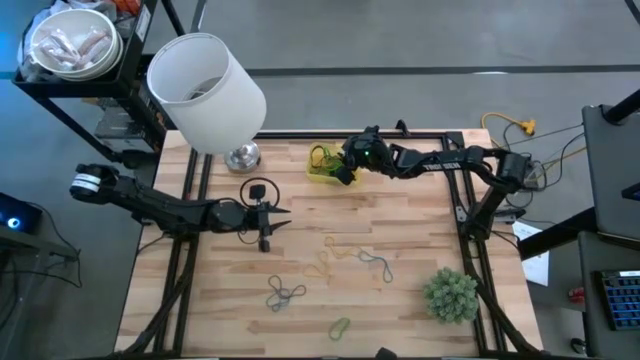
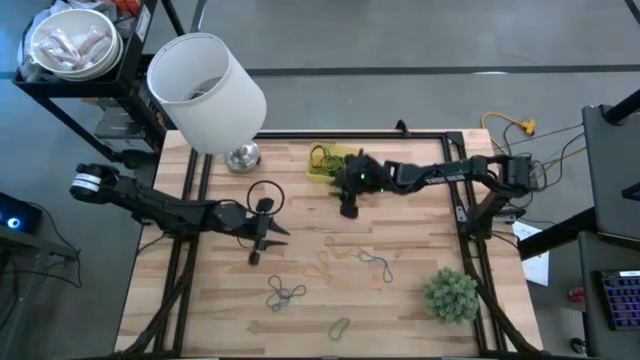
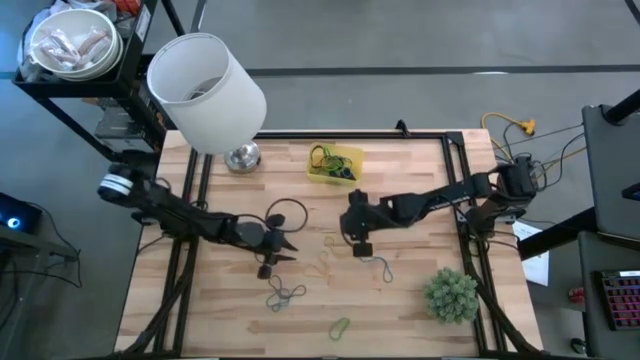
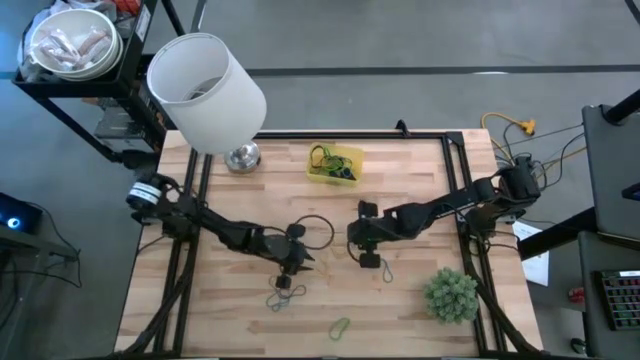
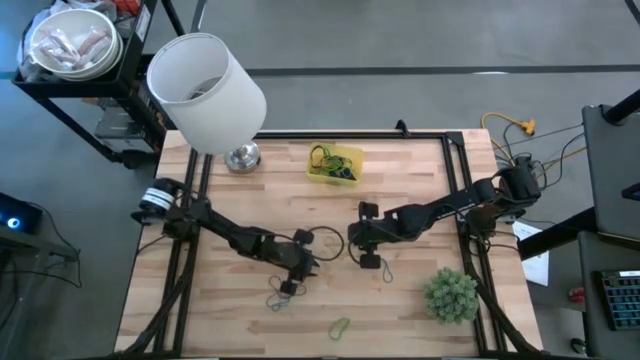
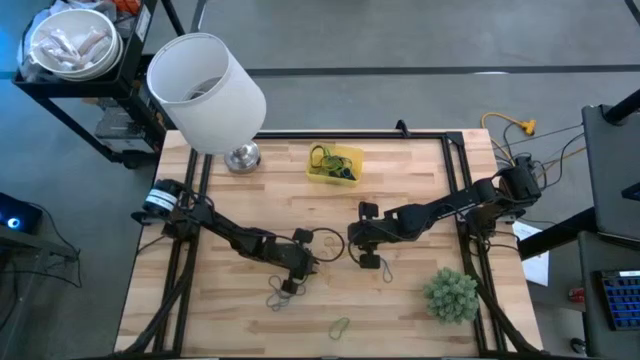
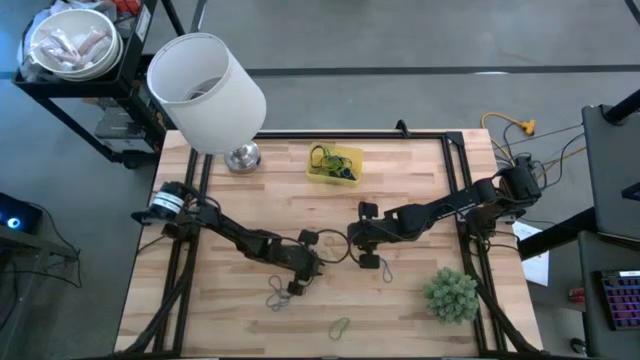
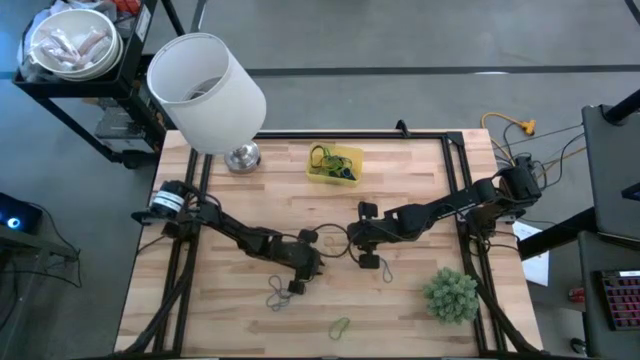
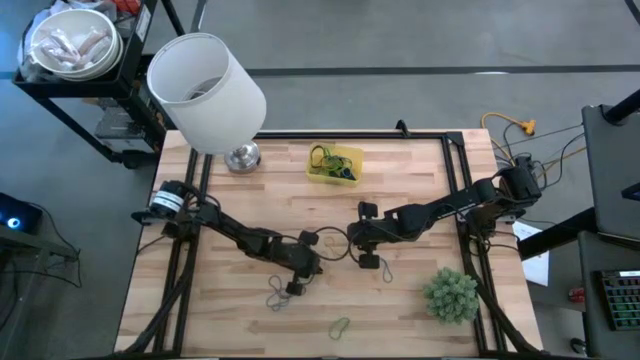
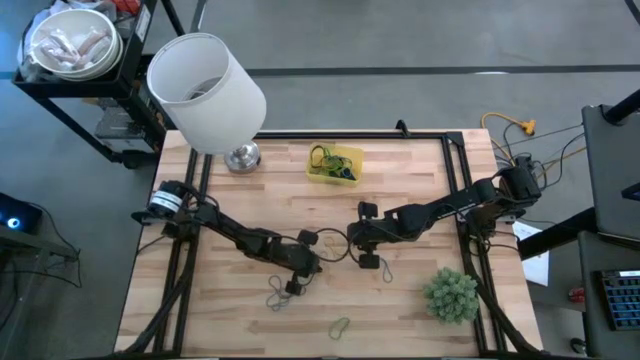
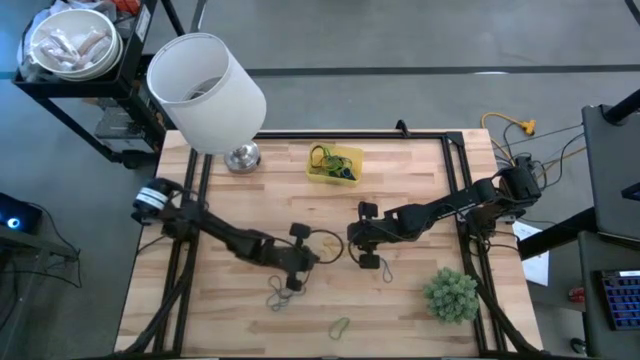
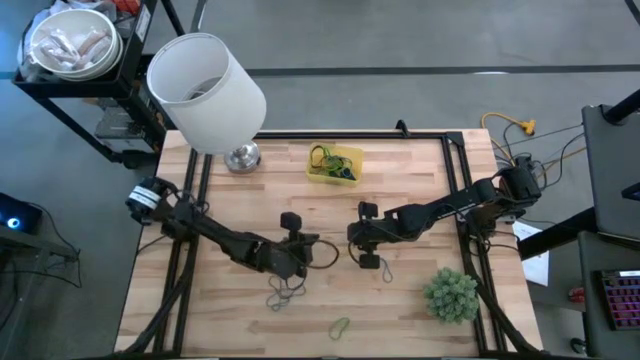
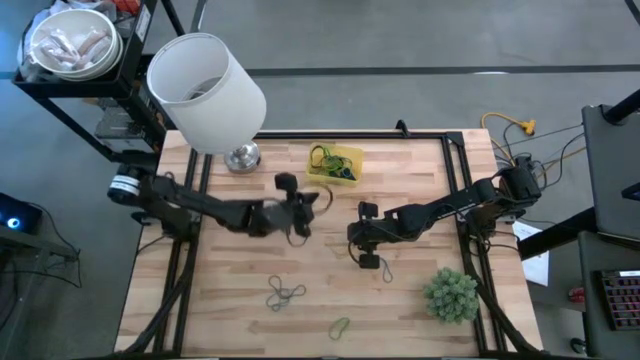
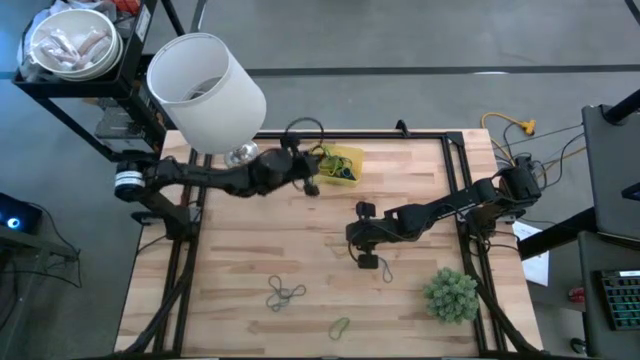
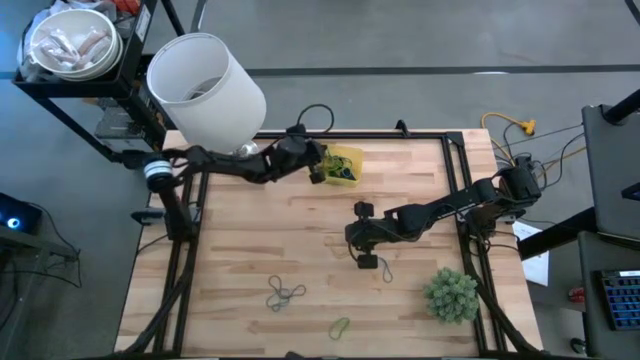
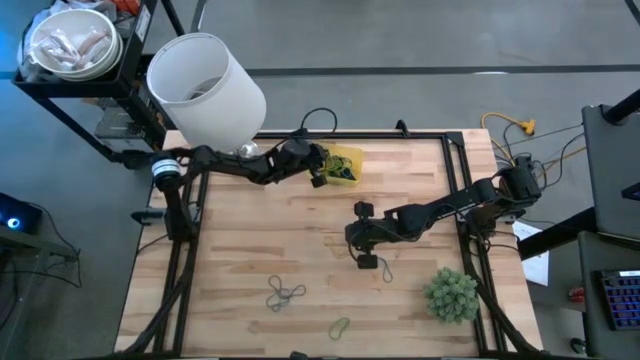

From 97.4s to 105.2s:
Task: Pick and place rubber bands into bin
Put the yellow rubber band into the yellow bin

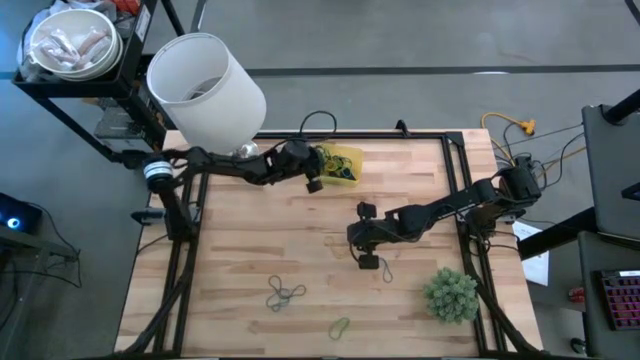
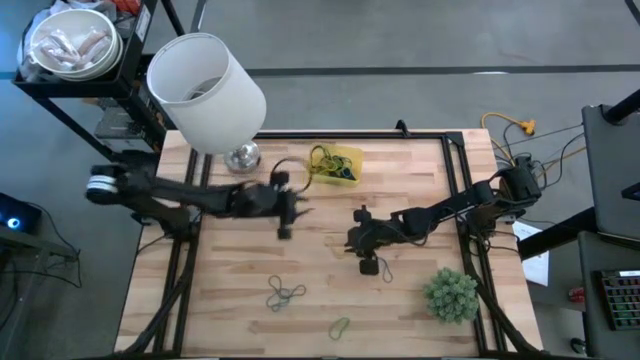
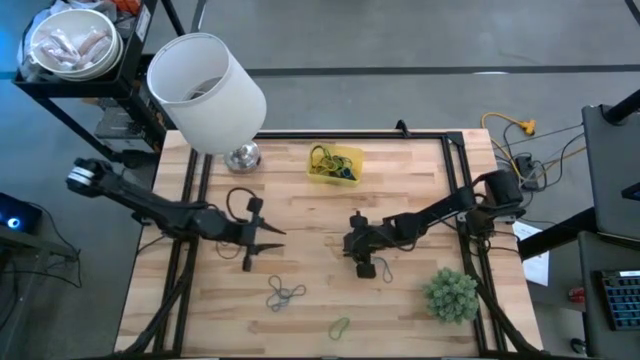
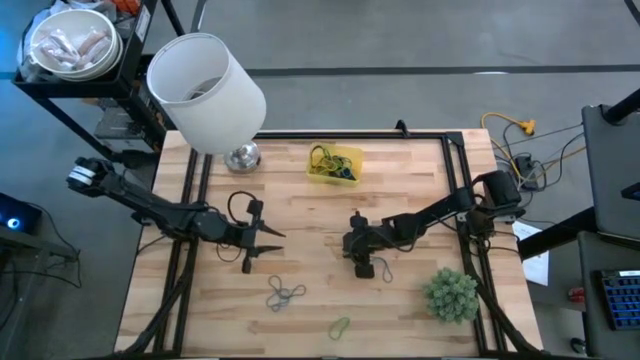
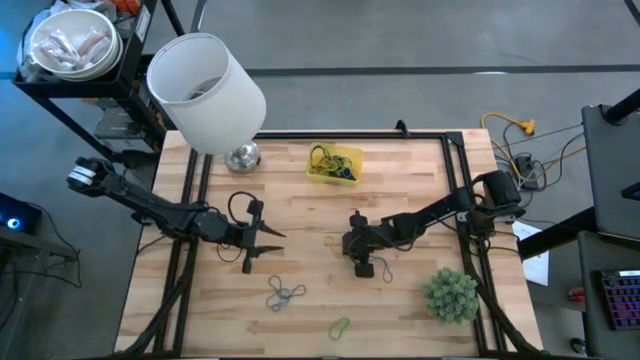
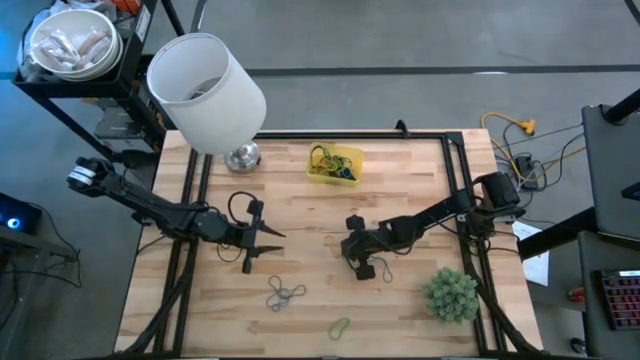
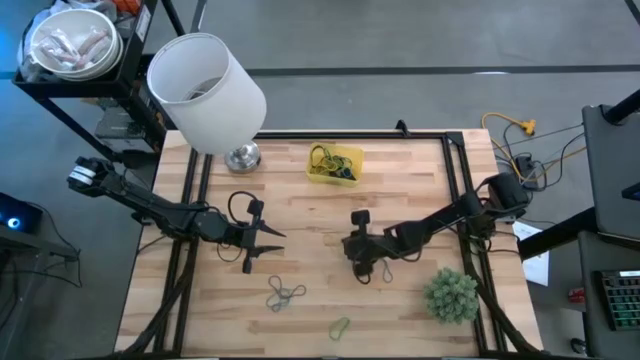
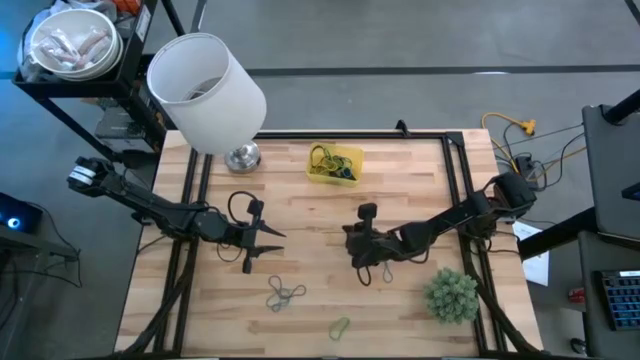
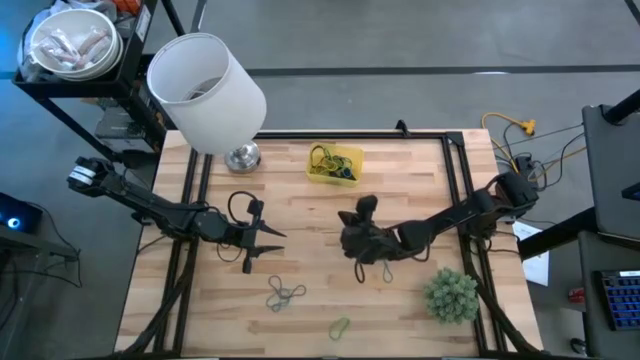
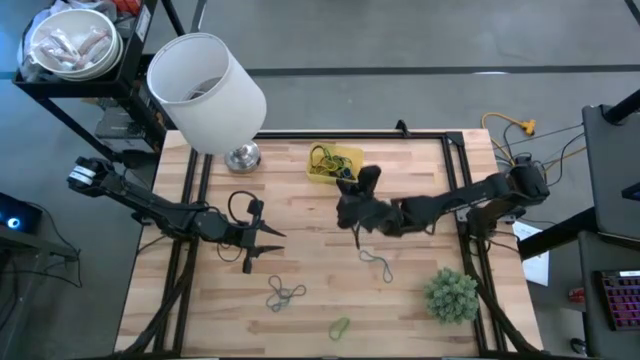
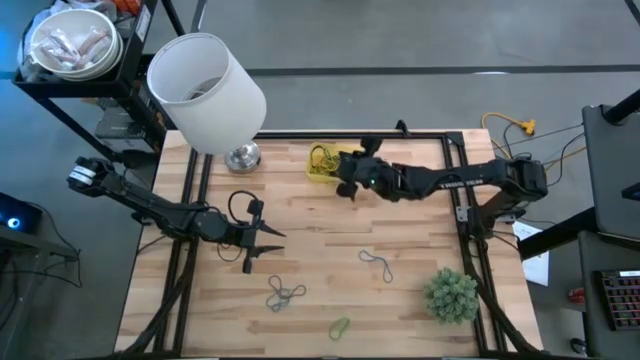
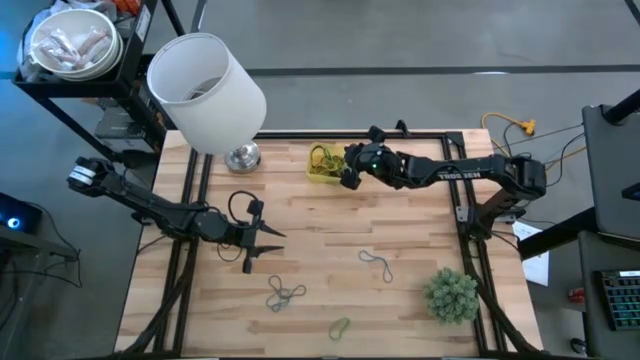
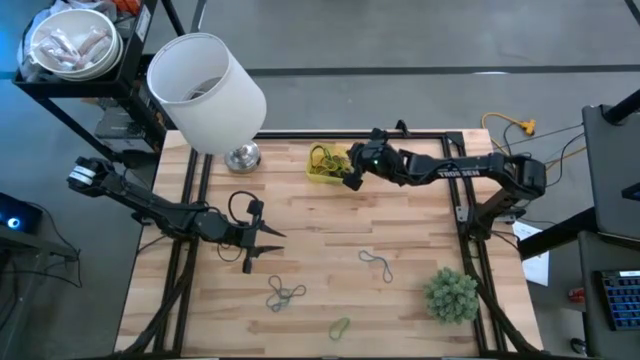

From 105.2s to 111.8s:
Put the yellow rubber band into the yellow bin

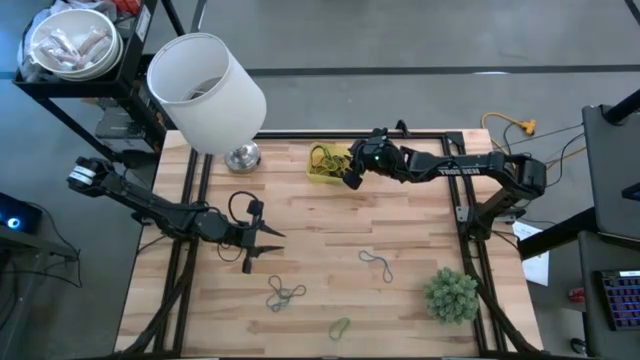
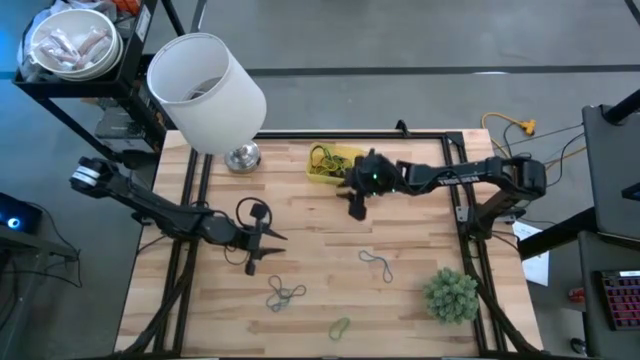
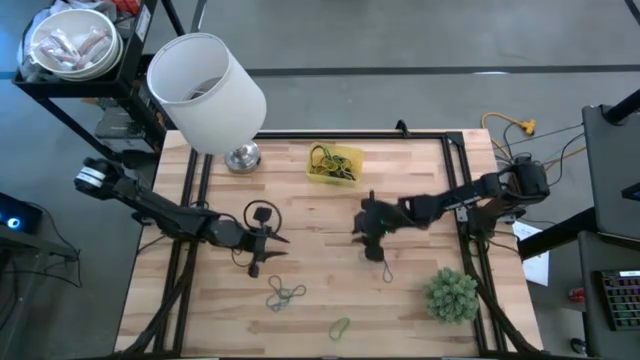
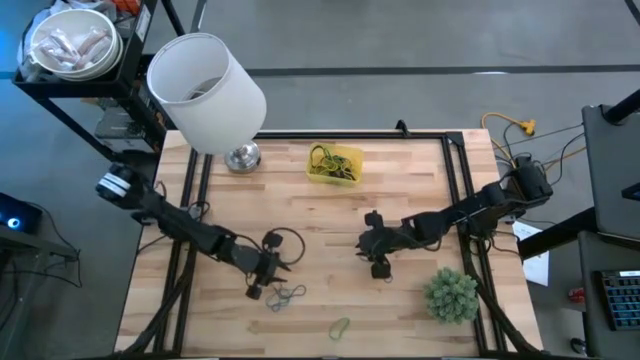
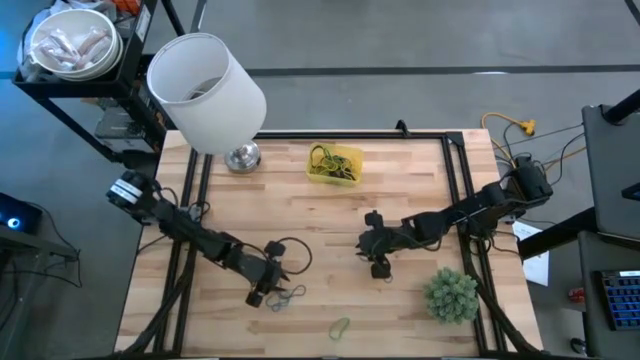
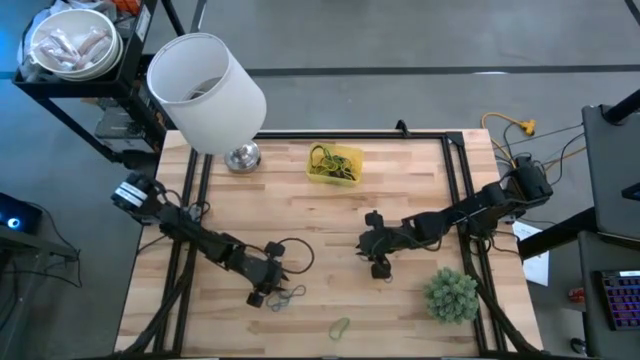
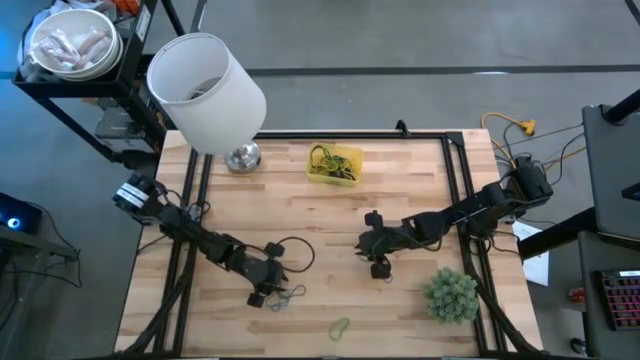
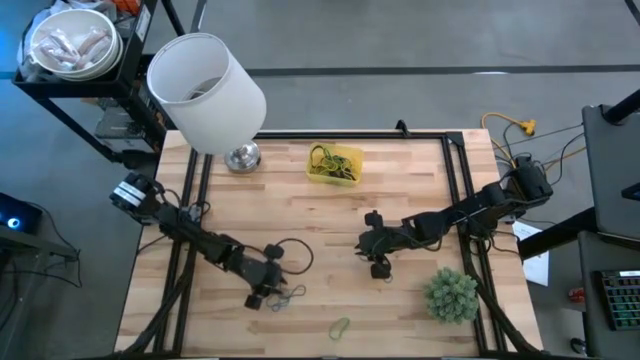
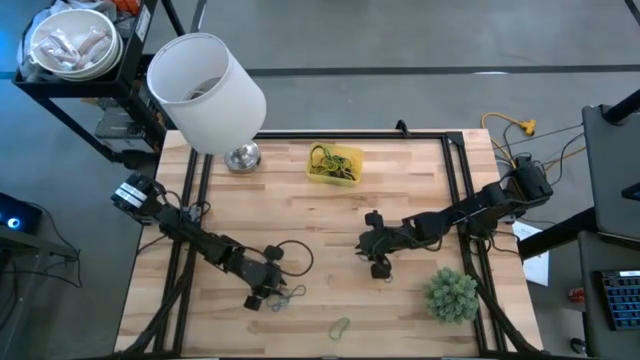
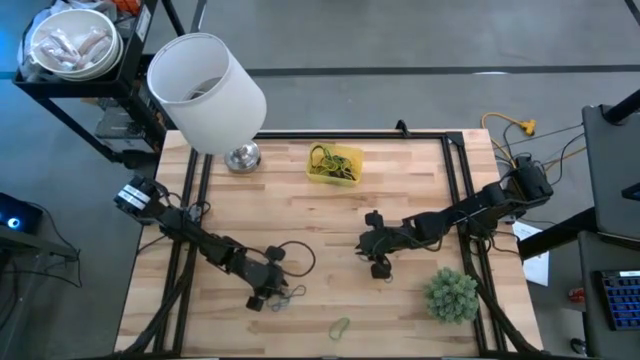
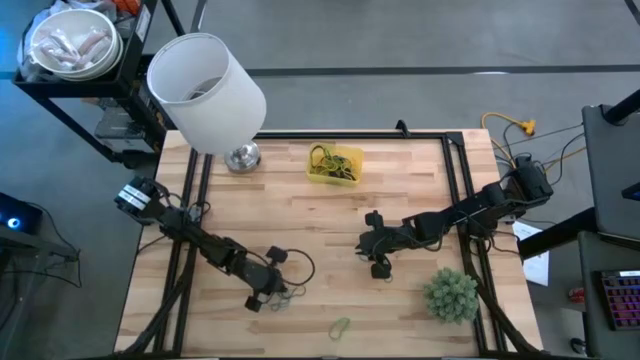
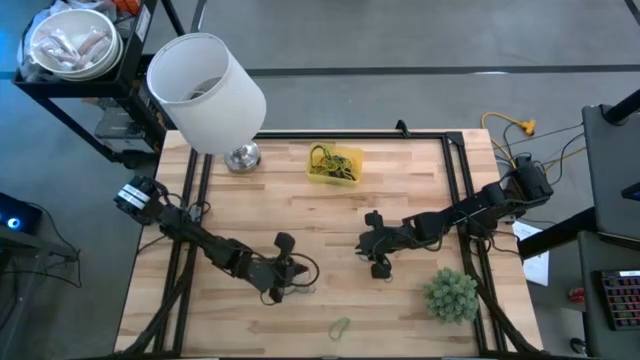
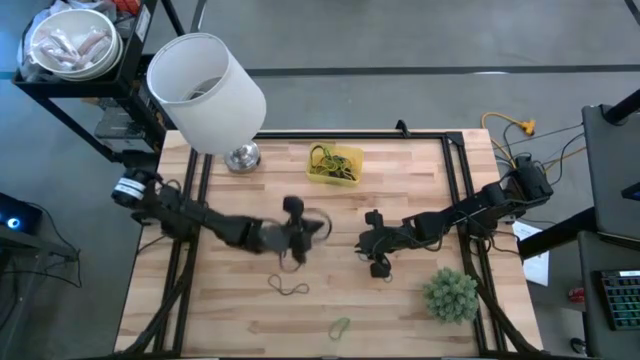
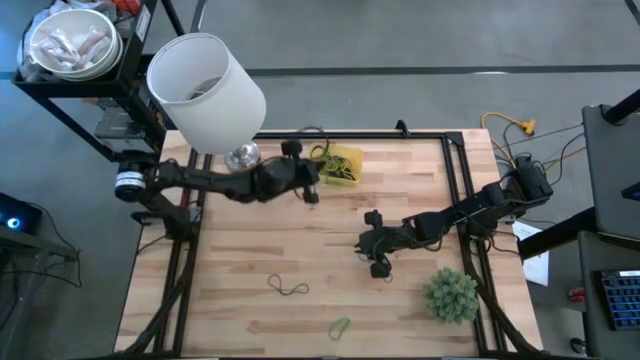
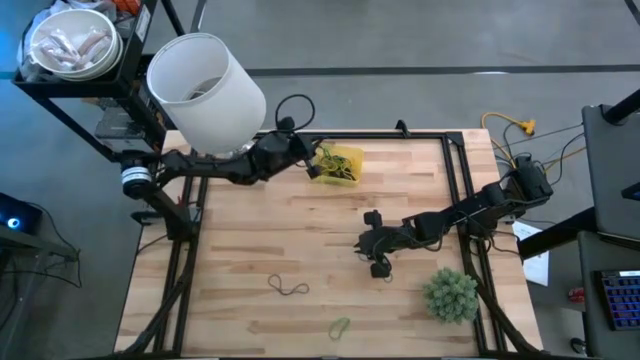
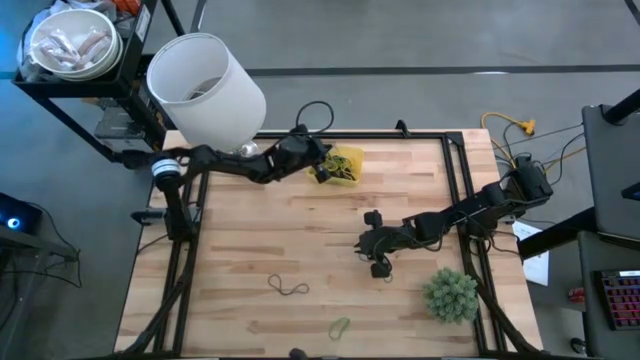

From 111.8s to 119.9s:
Put the blue rubber band into the yellow bin
